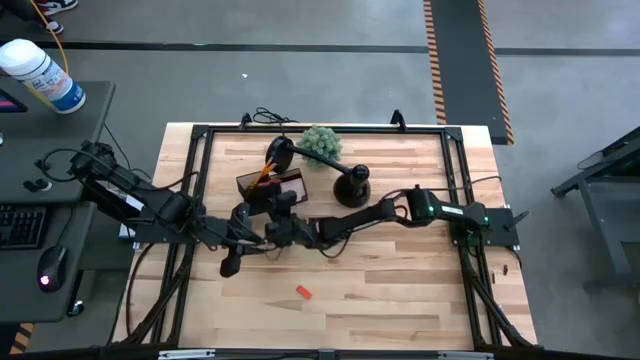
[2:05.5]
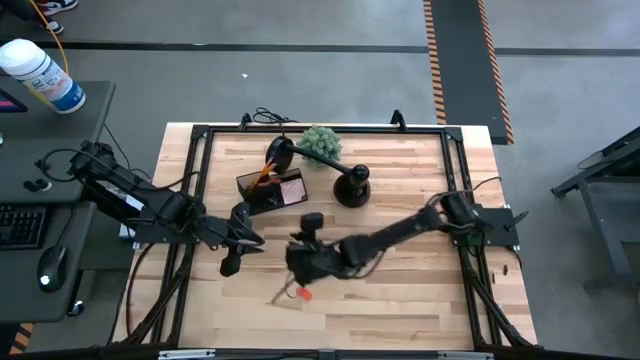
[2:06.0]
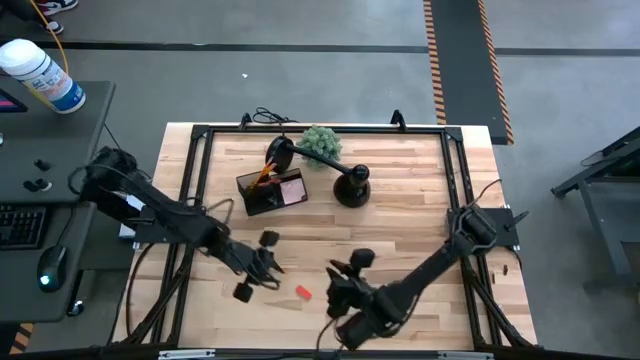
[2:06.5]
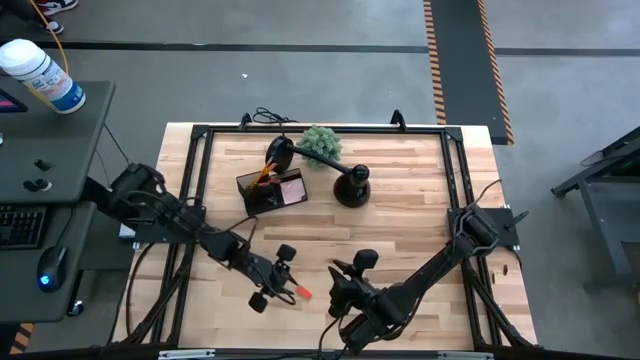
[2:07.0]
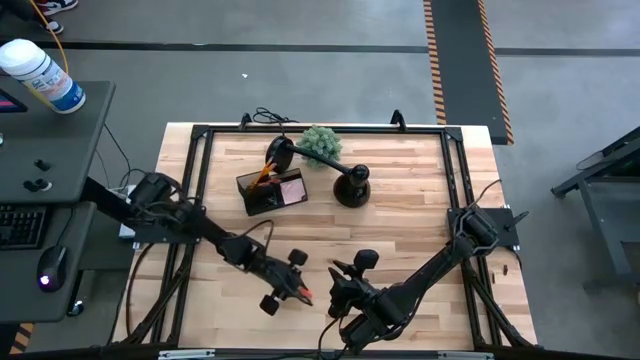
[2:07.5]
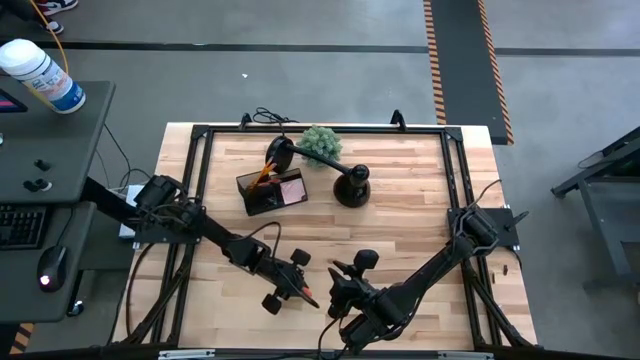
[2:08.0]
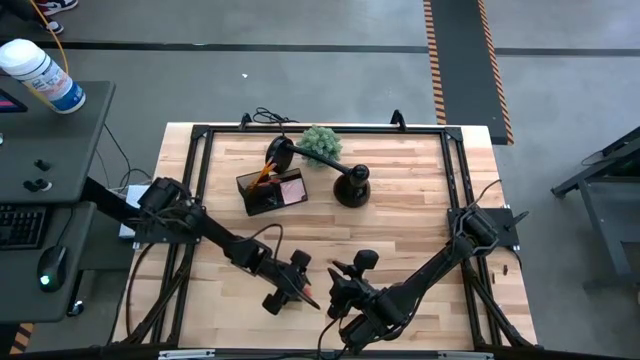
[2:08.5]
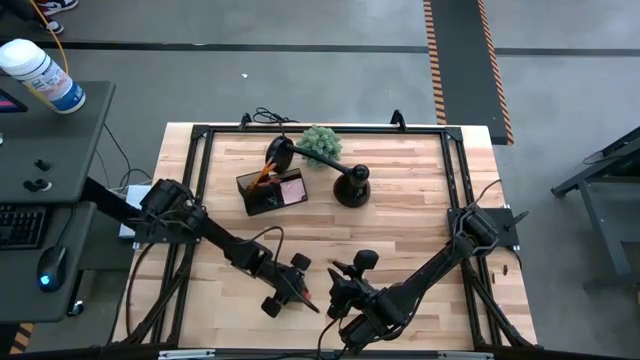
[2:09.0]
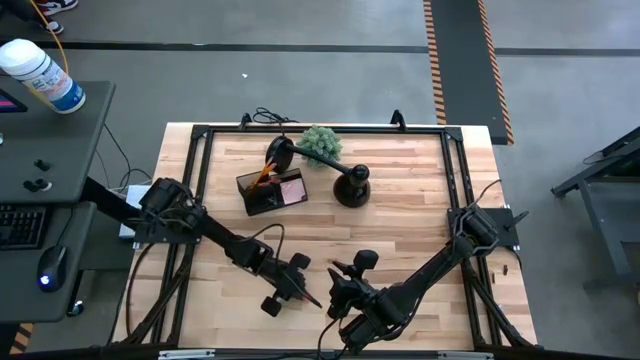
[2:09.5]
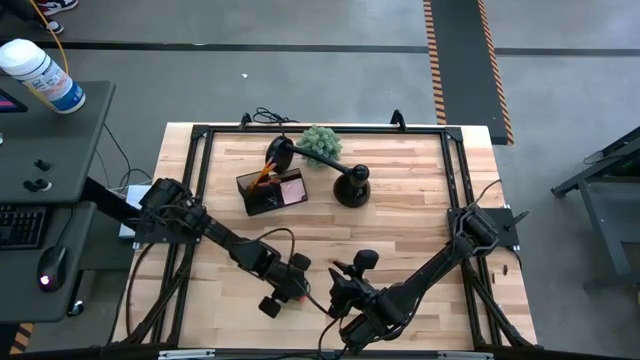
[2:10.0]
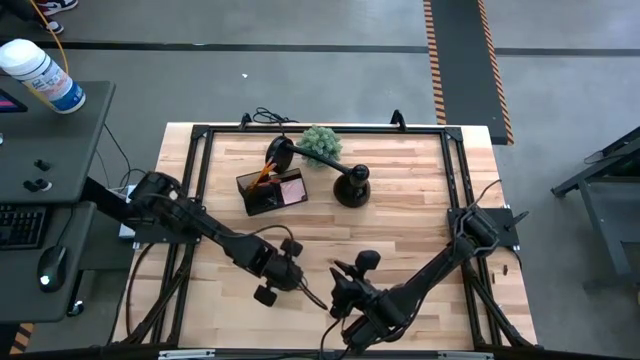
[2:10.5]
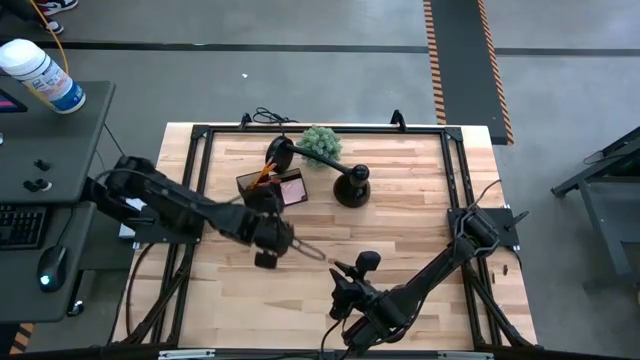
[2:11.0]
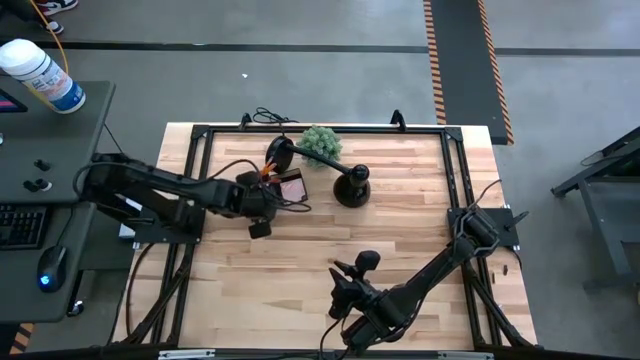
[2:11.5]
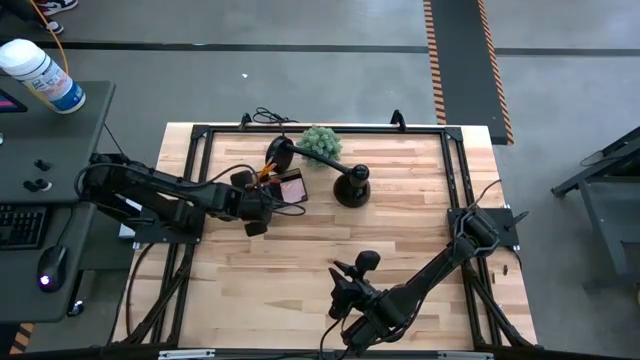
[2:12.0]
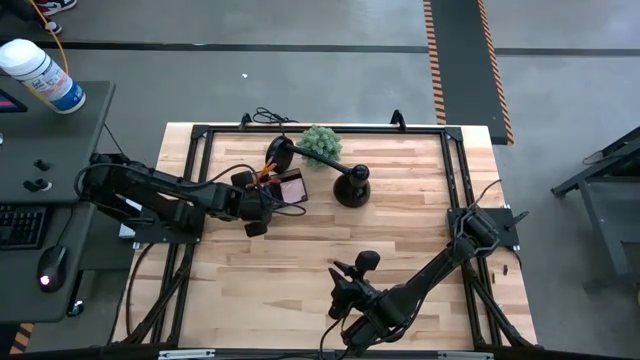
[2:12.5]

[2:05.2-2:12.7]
Task: Pick and place office supplies into organizer
Put the orange eraser into the black desk organizer

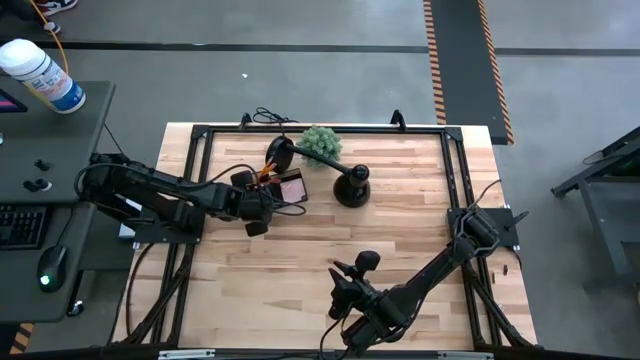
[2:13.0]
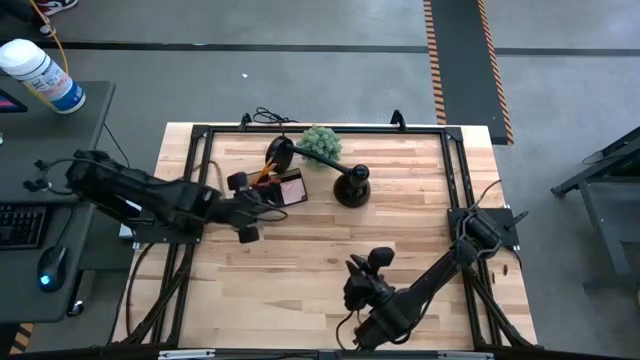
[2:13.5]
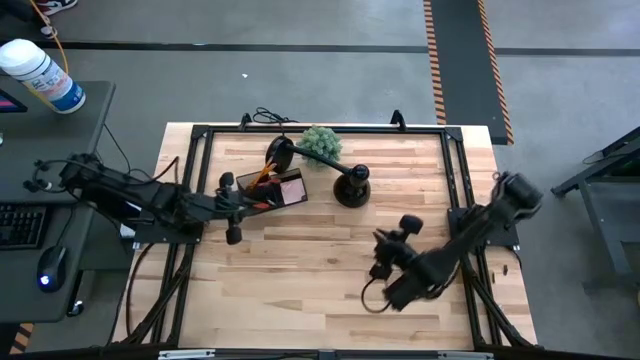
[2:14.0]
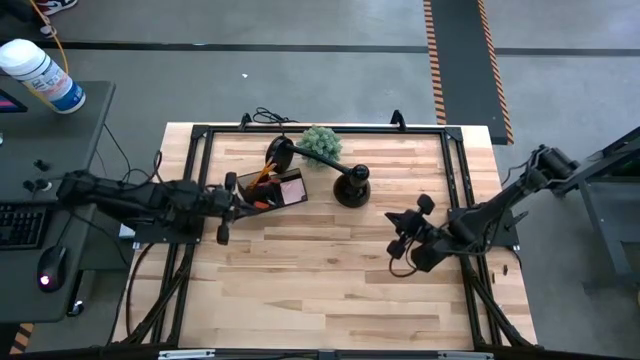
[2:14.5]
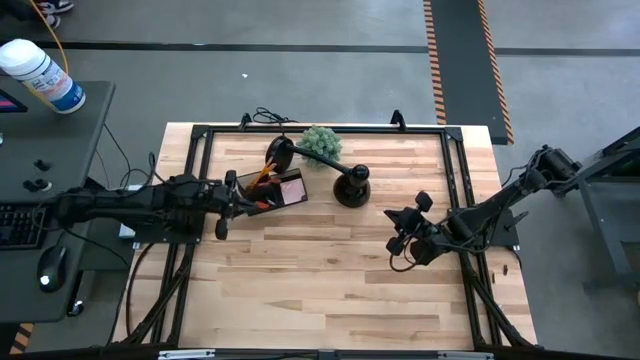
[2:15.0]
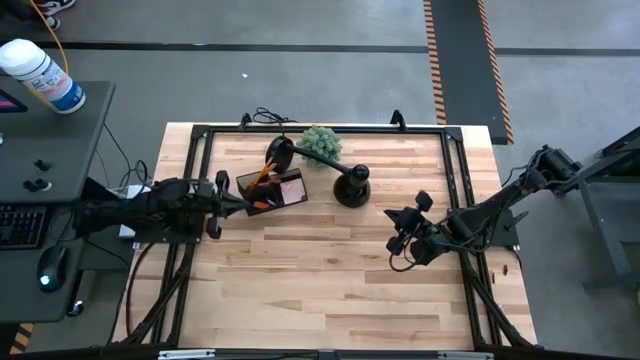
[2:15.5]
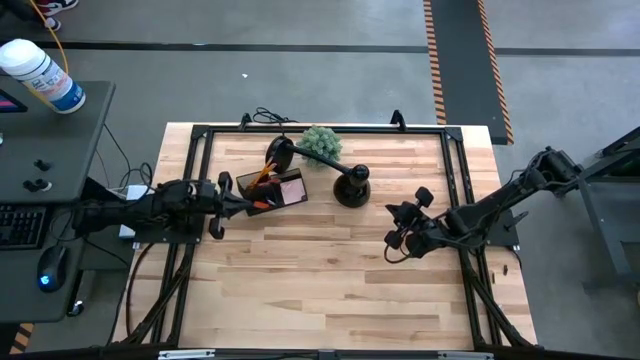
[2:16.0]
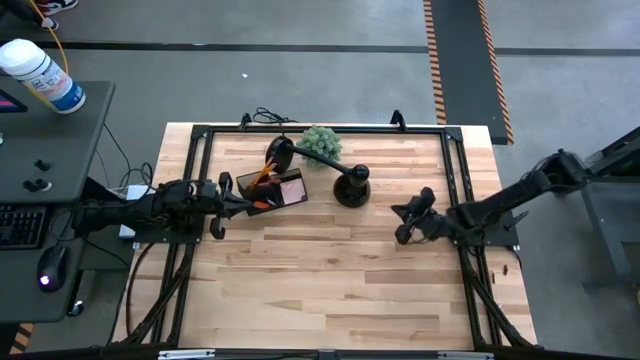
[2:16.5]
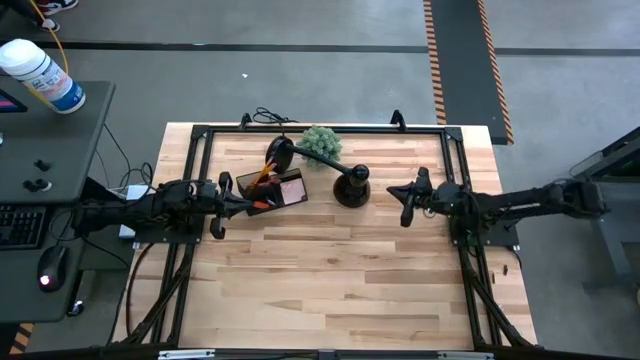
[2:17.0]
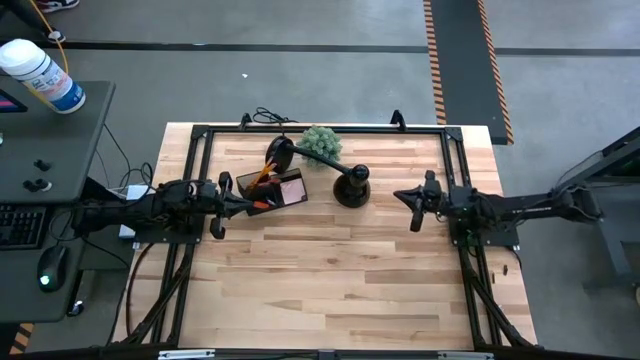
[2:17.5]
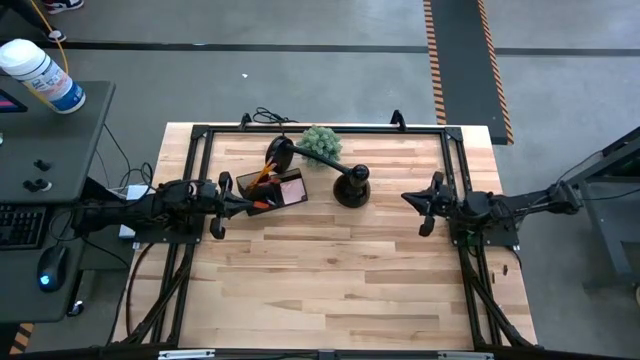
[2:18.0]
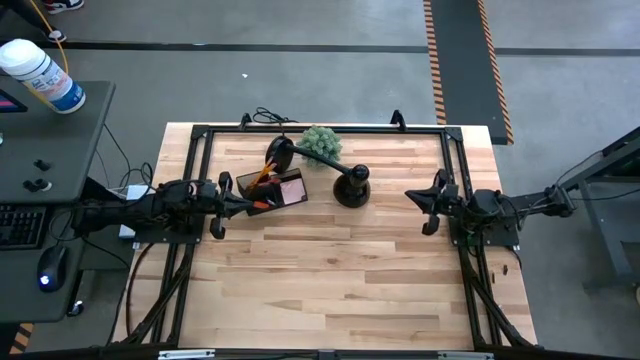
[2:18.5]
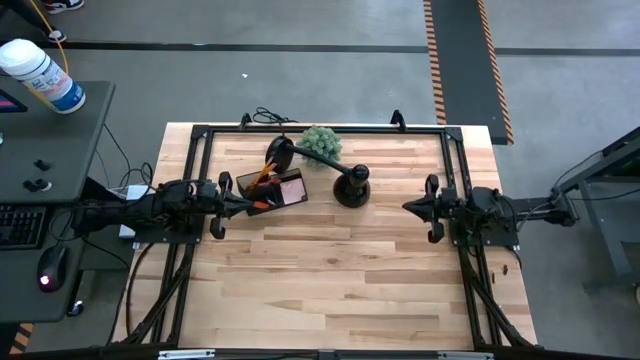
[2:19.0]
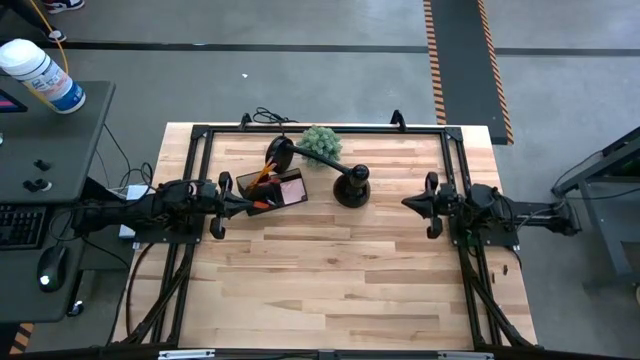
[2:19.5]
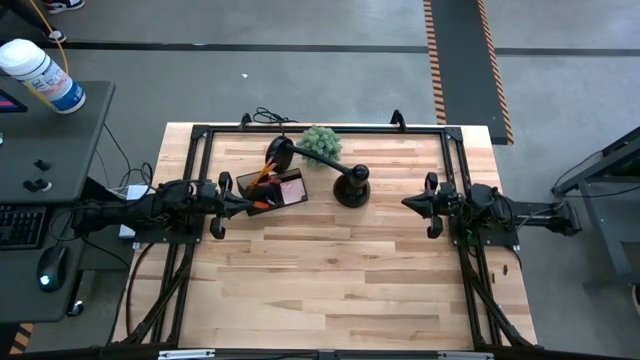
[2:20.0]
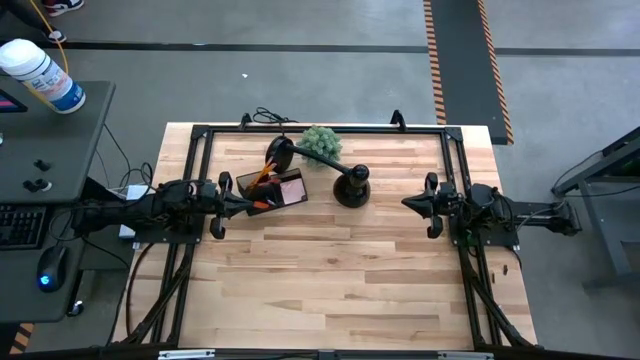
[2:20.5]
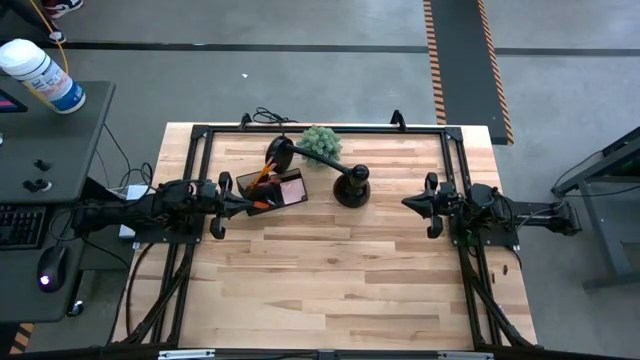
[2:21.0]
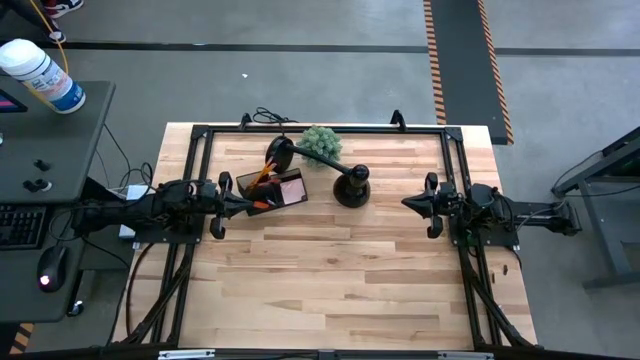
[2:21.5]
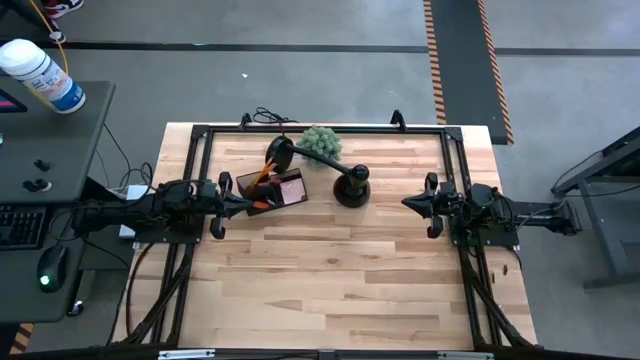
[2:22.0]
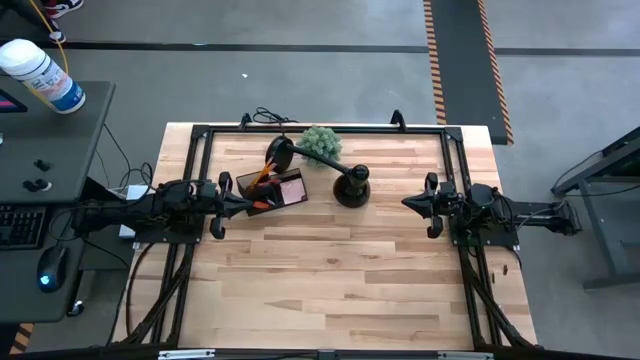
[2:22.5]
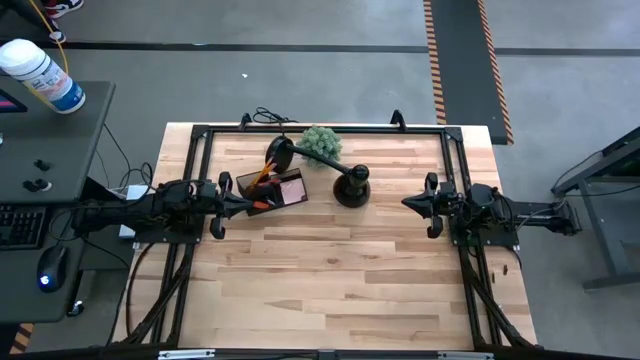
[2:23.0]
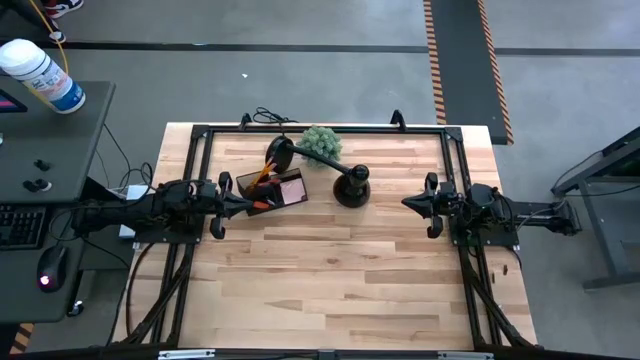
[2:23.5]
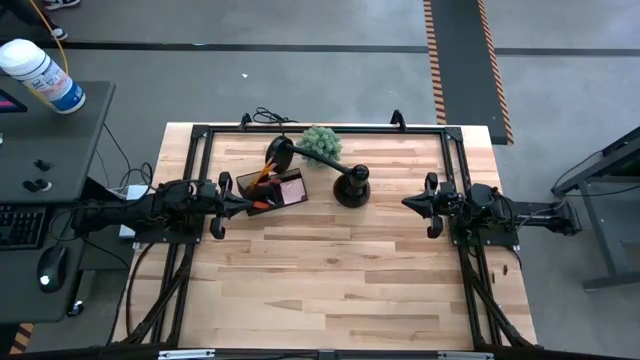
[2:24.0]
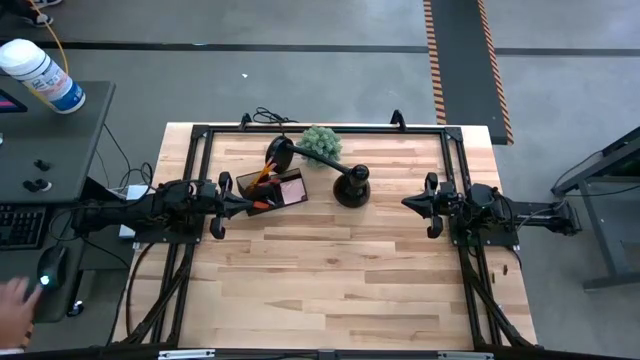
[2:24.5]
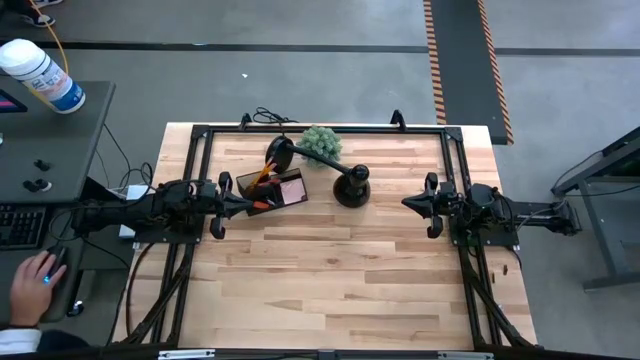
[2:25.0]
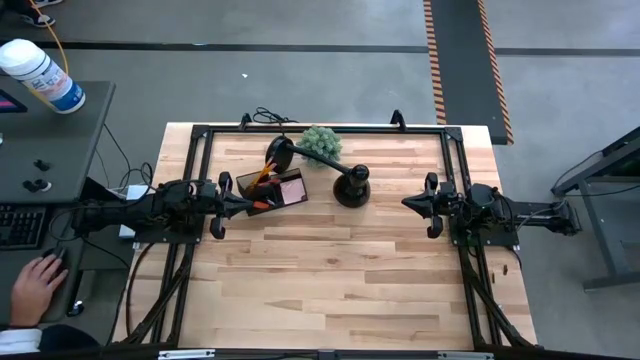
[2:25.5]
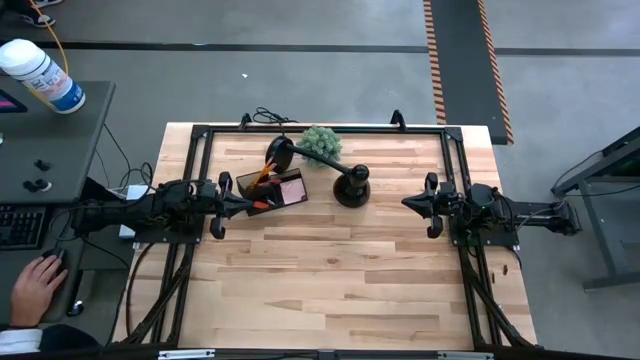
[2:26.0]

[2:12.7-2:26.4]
Return to Home Position

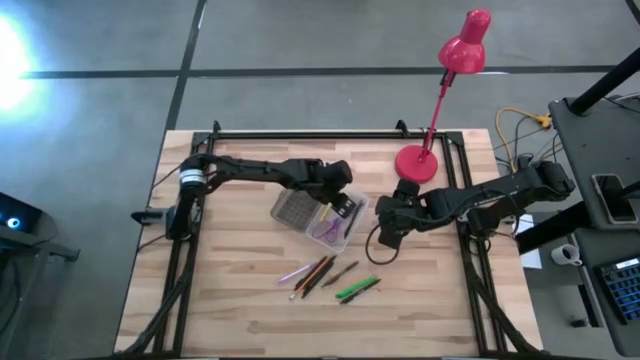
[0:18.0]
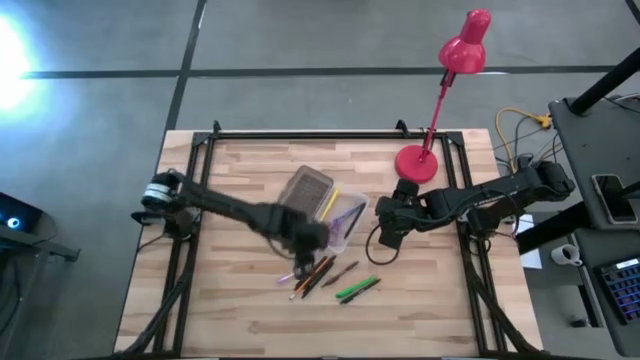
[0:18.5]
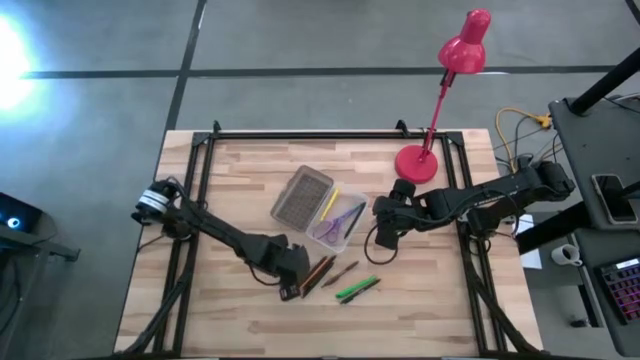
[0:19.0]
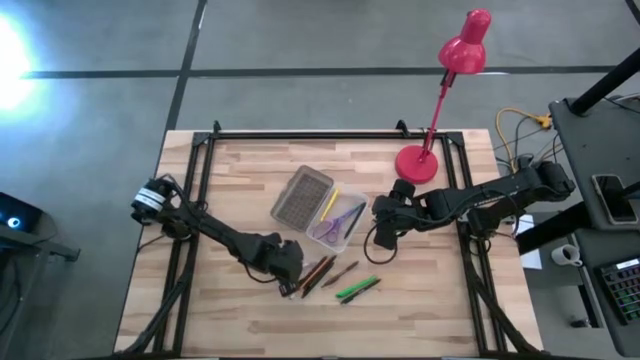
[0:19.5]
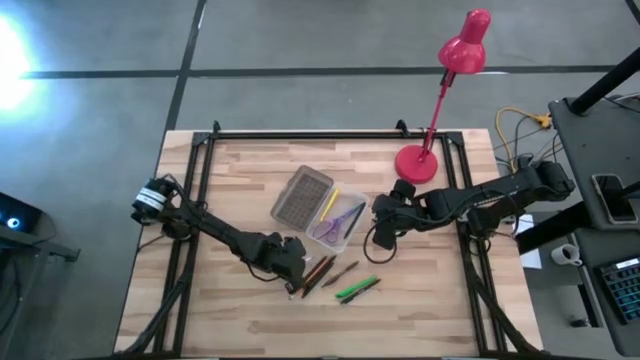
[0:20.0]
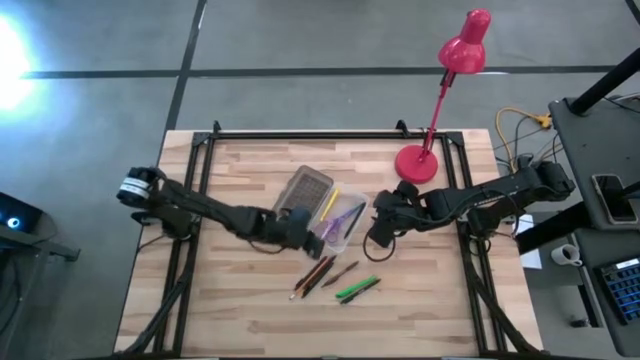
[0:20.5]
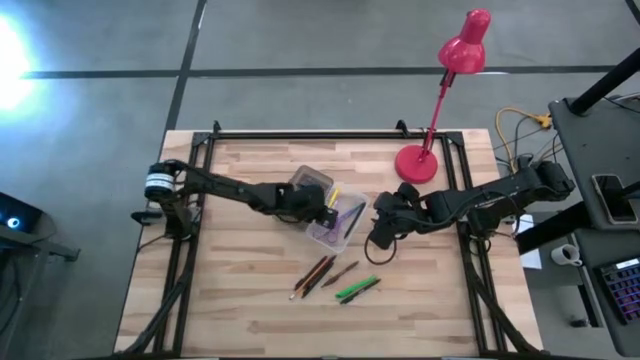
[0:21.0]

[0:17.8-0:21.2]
Task: Pick & place school supplies into a supply box
Put the purple pen into the gray supply box
